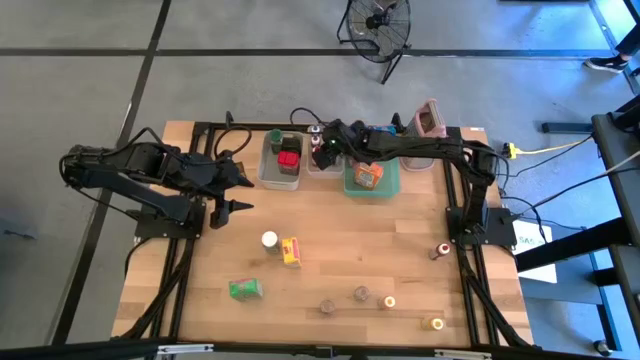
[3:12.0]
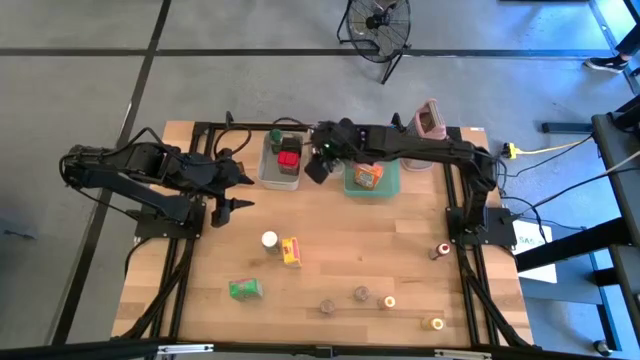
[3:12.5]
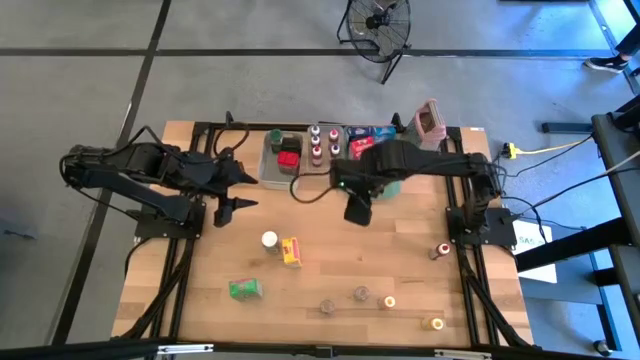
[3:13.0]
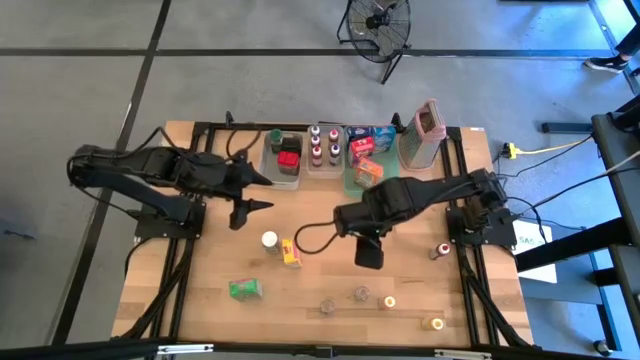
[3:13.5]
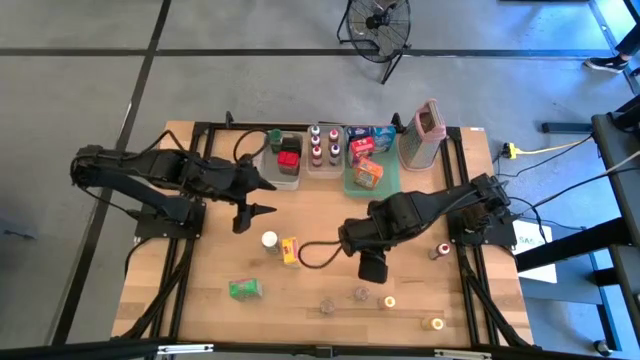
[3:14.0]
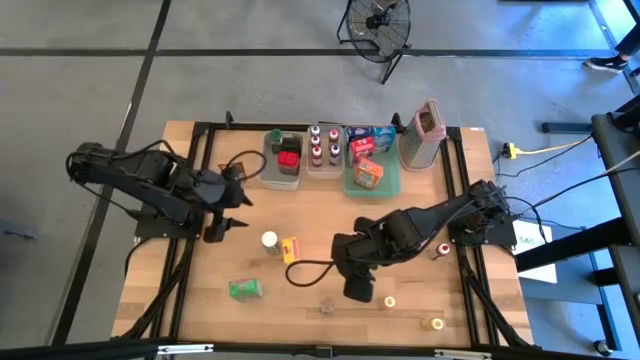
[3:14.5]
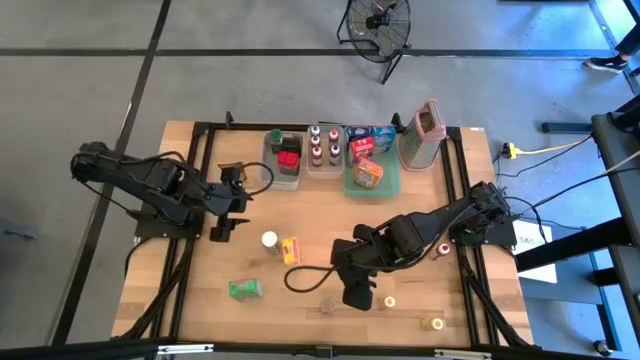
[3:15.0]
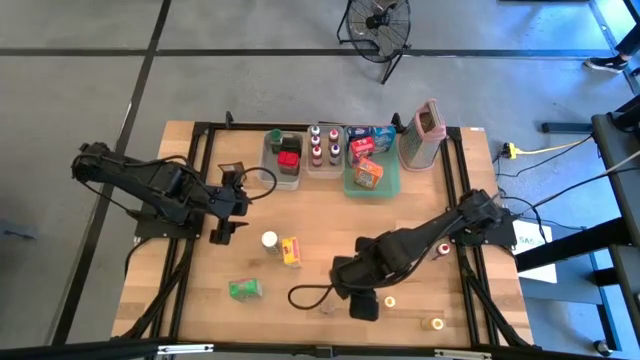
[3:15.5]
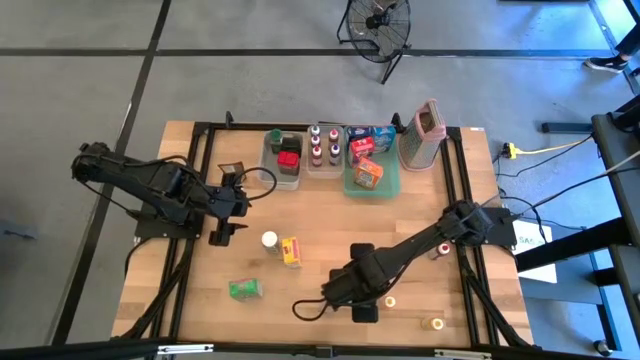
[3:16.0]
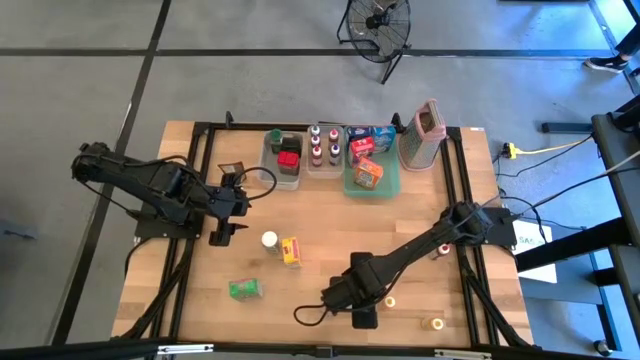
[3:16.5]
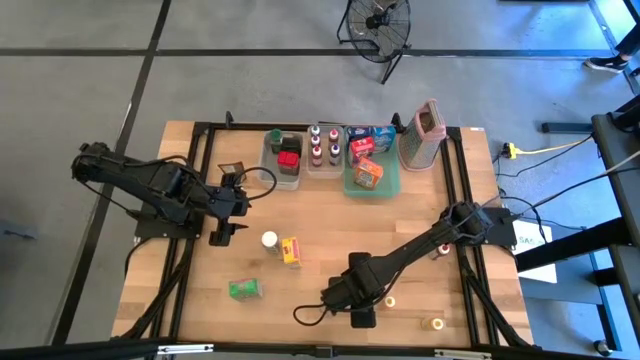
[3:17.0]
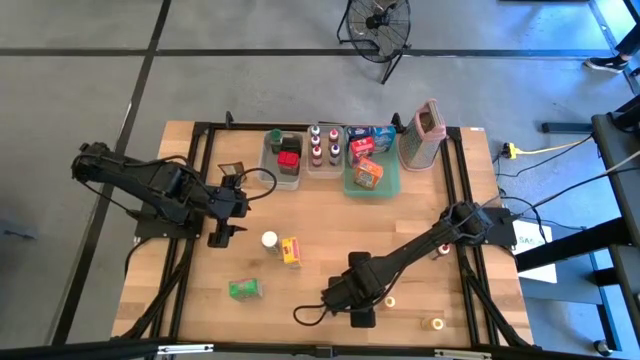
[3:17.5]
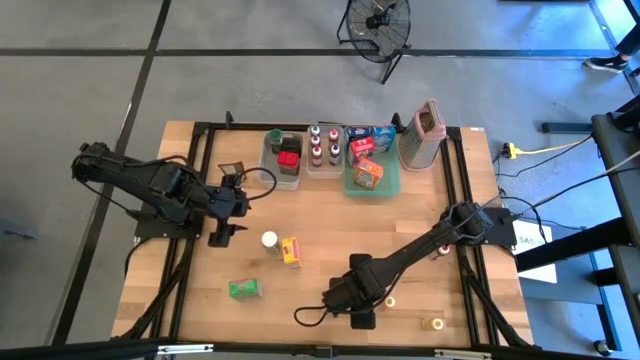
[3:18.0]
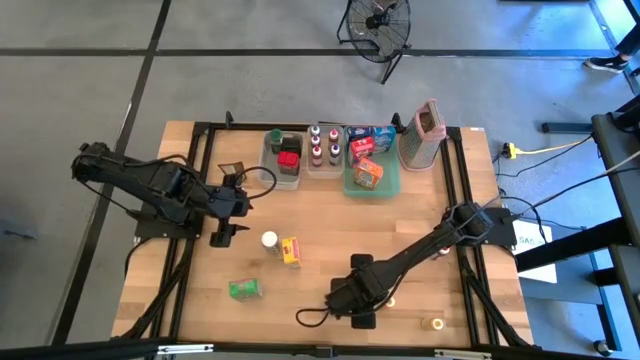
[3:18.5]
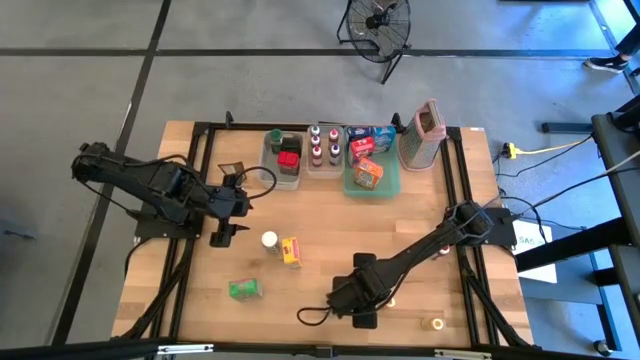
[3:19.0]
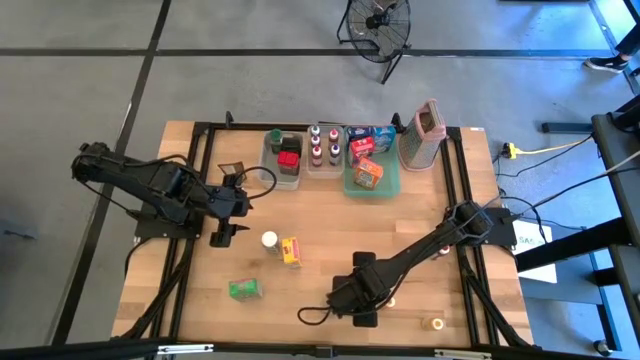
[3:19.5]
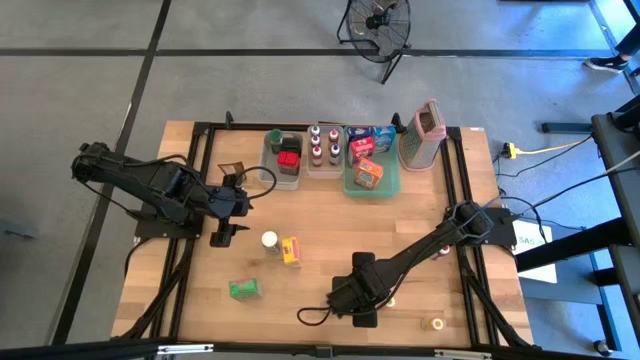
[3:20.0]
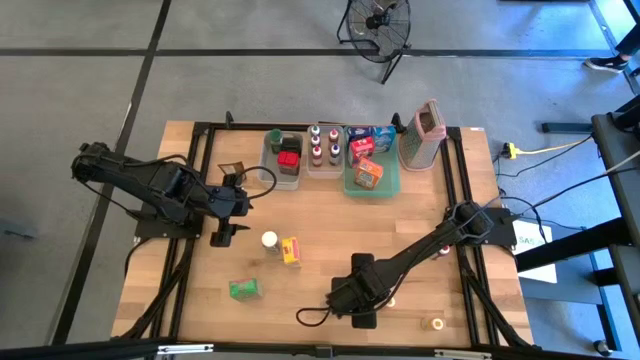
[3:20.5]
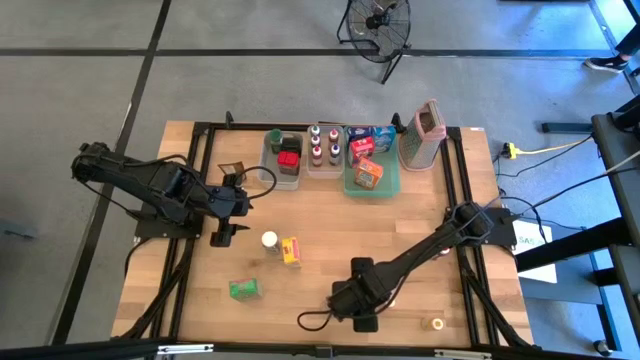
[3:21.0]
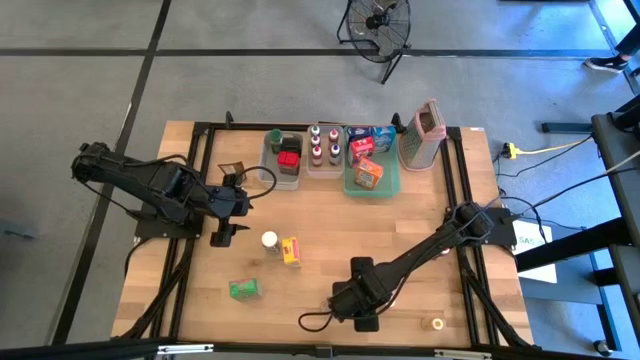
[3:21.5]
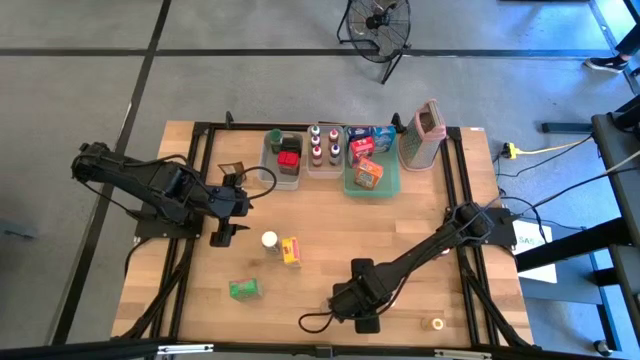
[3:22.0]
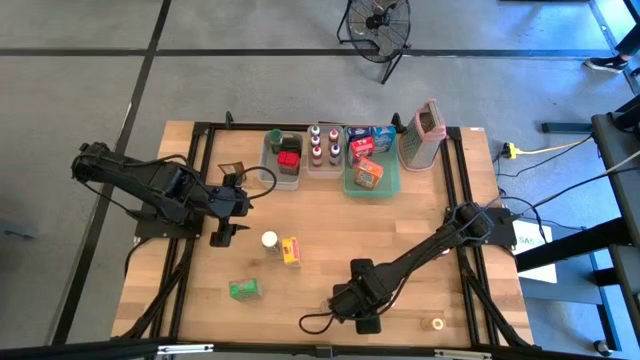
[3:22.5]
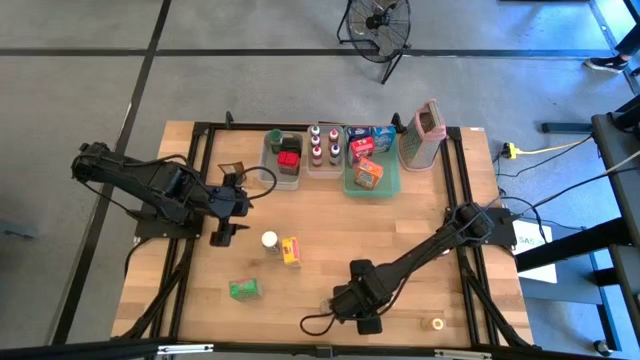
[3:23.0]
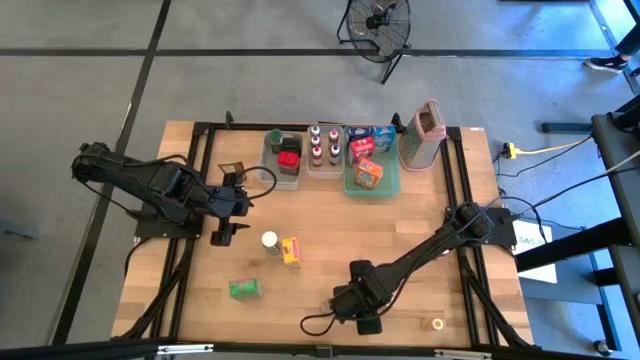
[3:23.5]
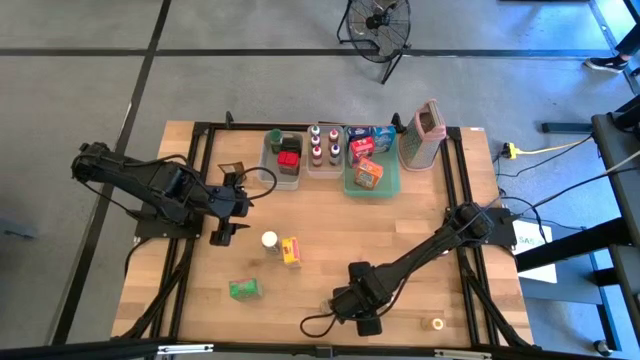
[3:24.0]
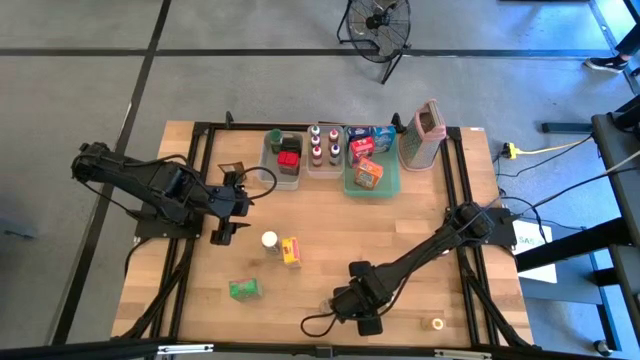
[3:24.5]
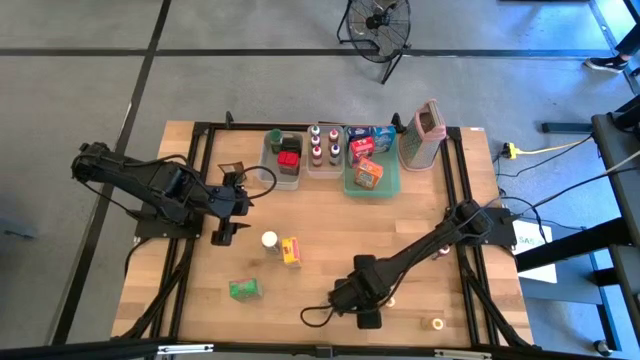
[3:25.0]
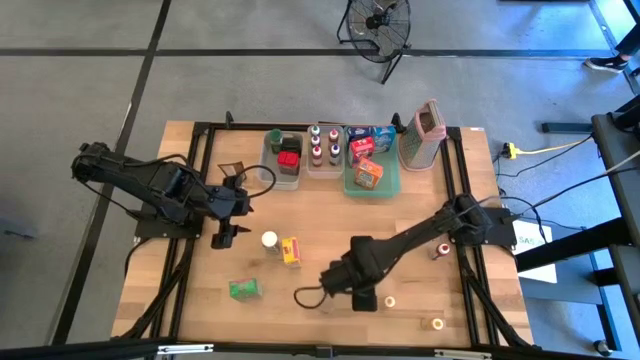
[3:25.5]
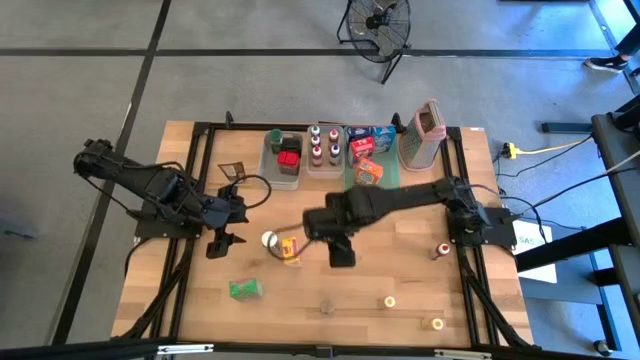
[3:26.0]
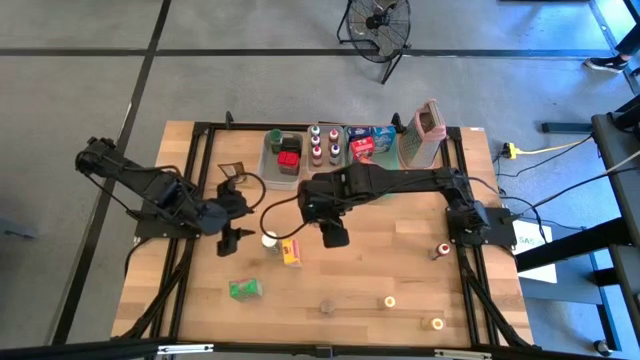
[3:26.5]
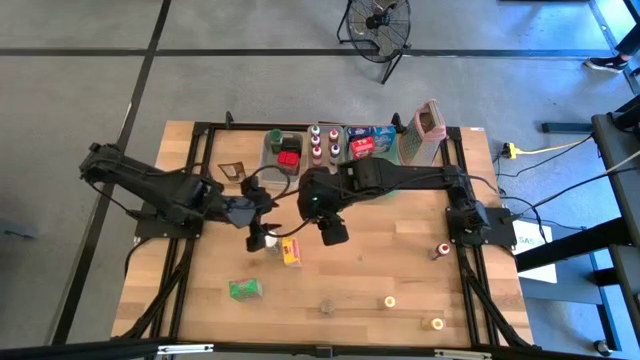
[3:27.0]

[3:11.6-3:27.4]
Task: Pick & Place Kitchen Items
Put the right brown seasoning bottle into the gray bin

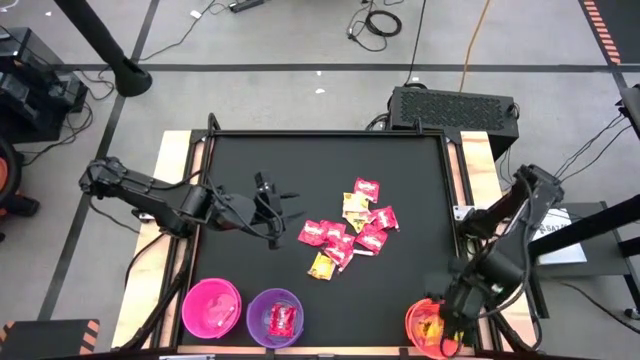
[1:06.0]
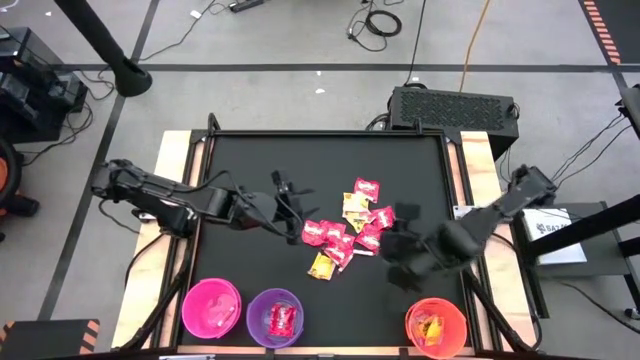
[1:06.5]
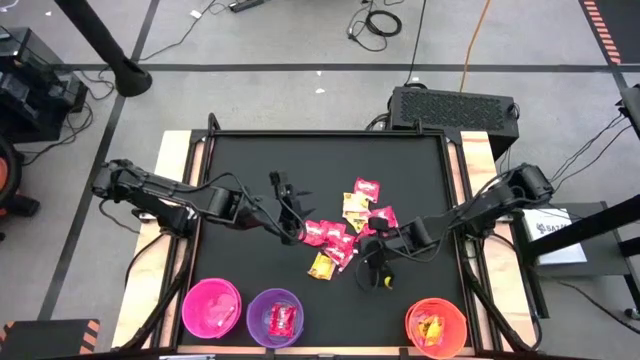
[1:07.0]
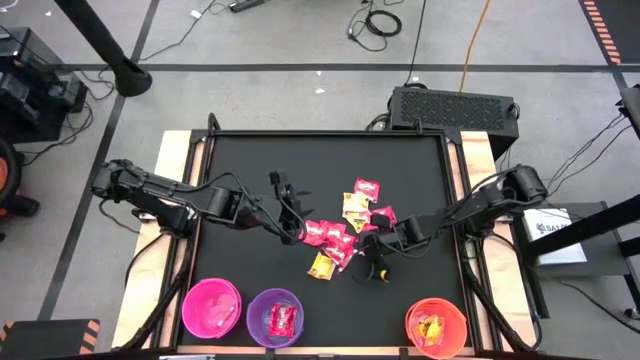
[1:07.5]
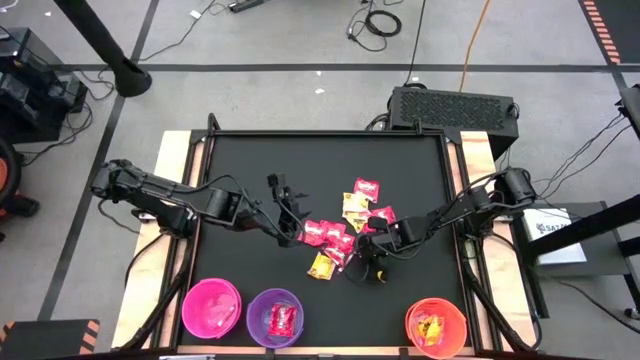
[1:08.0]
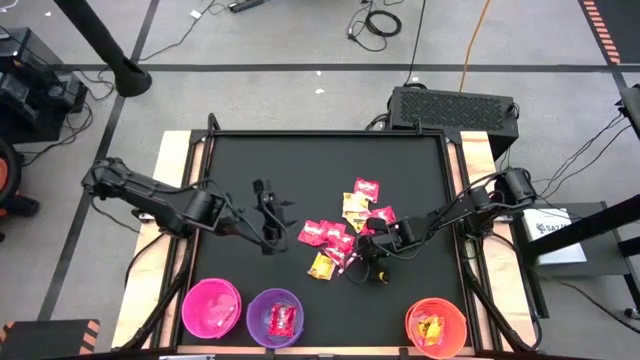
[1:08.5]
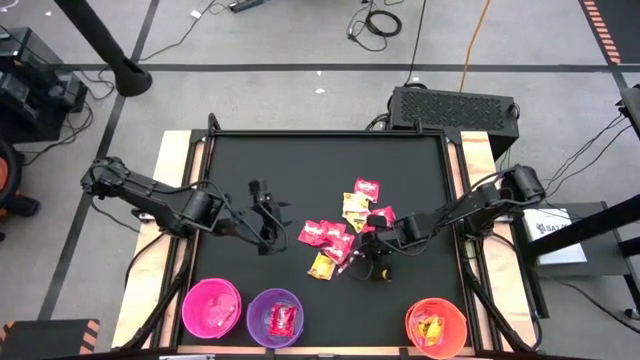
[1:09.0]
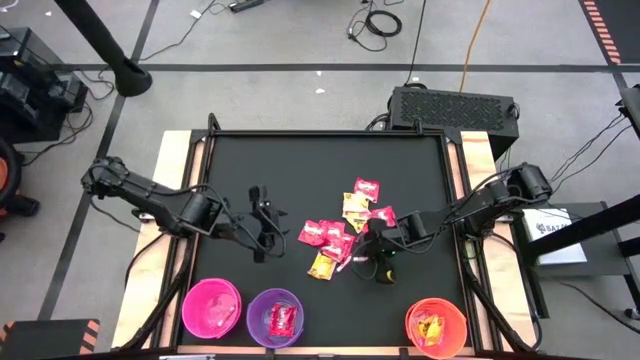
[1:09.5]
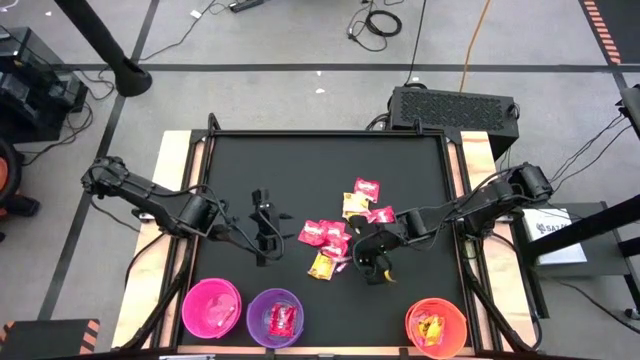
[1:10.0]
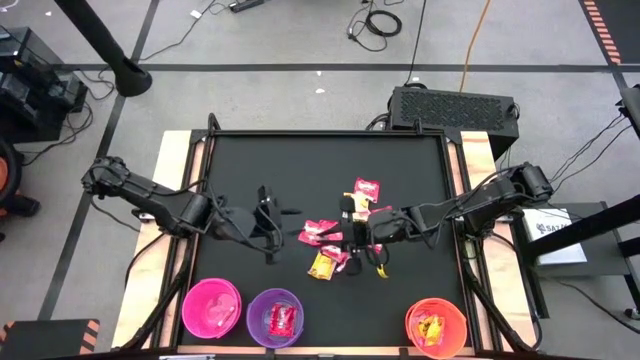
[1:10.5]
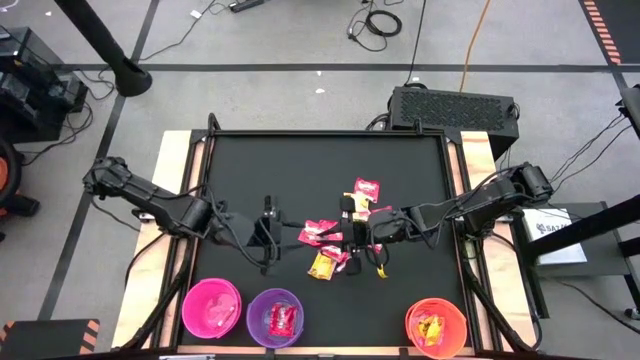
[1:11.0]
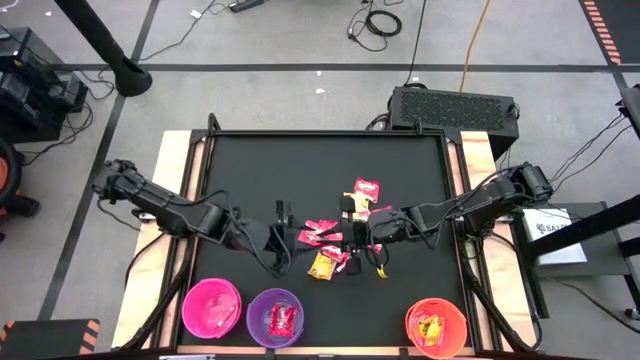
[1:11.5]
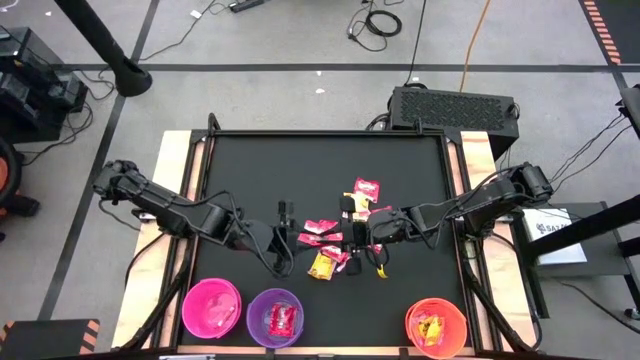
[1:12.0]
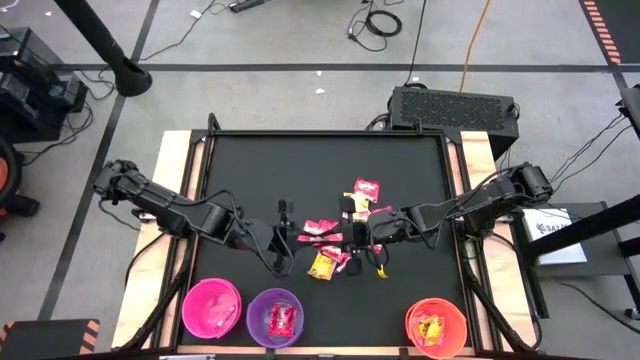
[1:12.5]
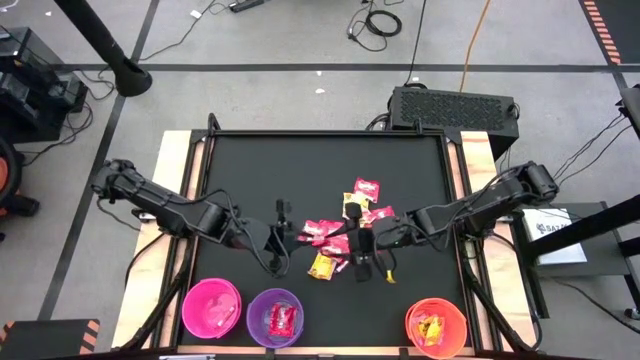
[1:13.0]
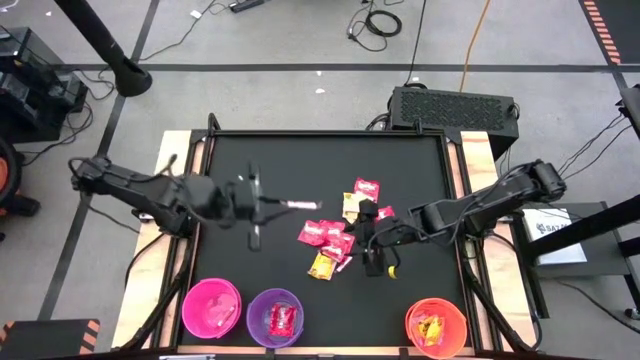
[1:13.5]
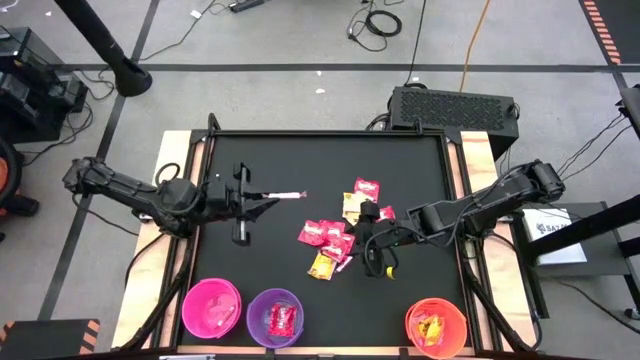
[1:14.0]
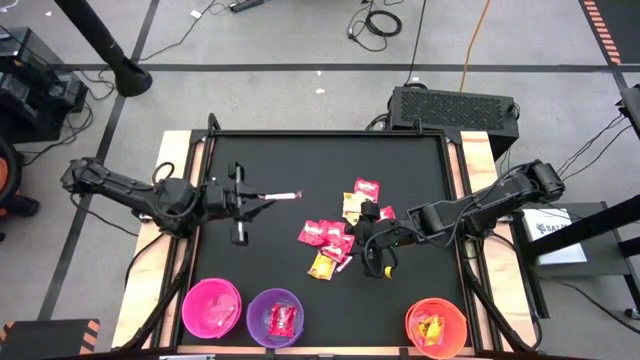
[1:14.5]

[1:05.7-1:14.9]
Task: Sort candy by brand, put in halloween buckets
Put the orange candy into the pink bucket
